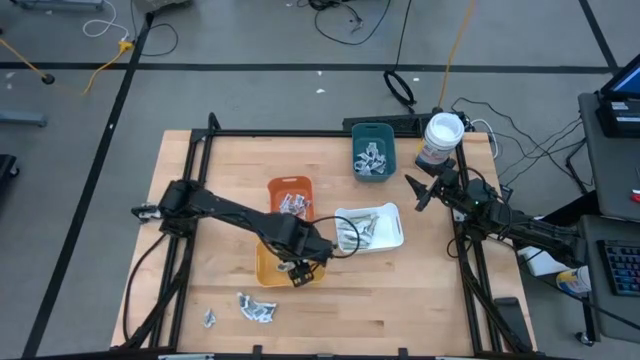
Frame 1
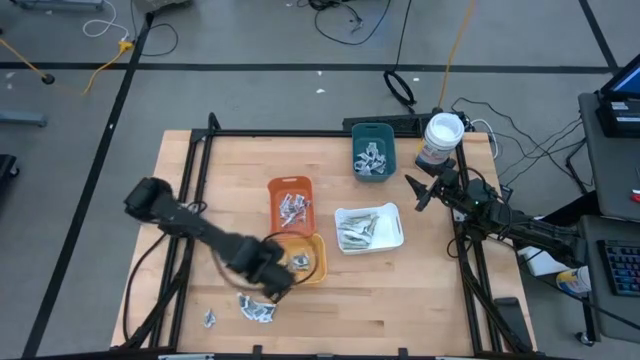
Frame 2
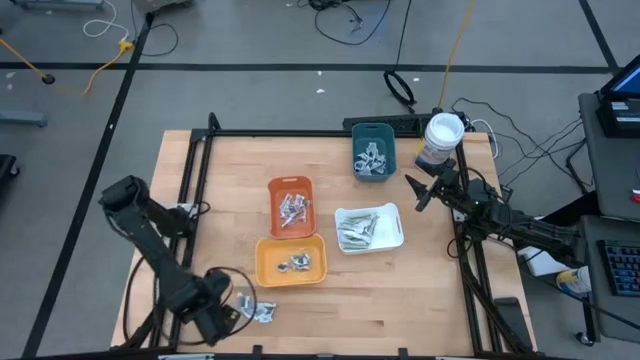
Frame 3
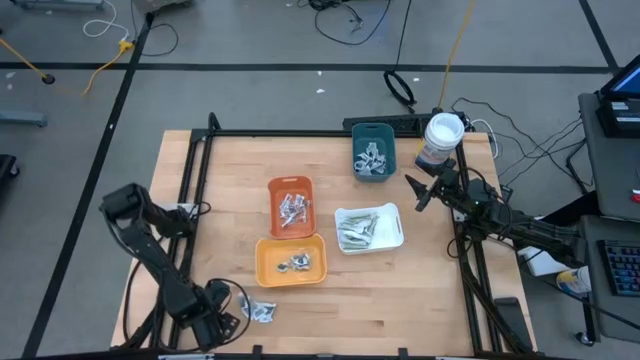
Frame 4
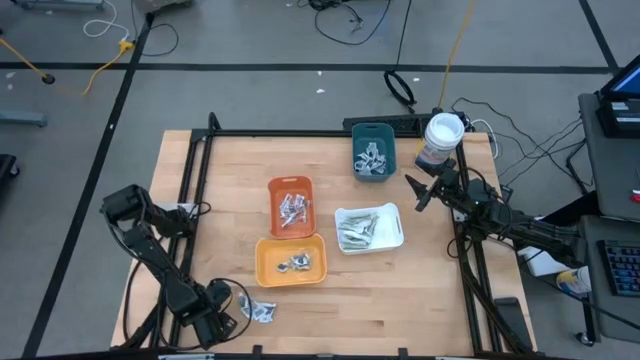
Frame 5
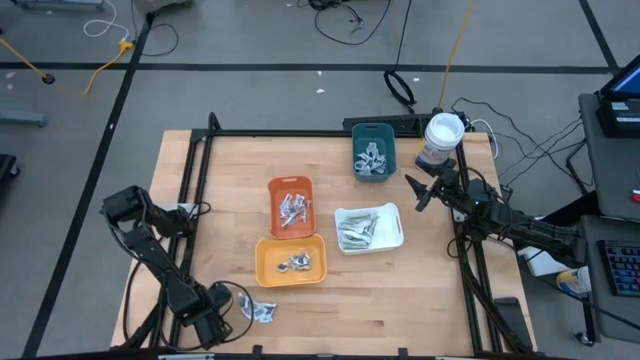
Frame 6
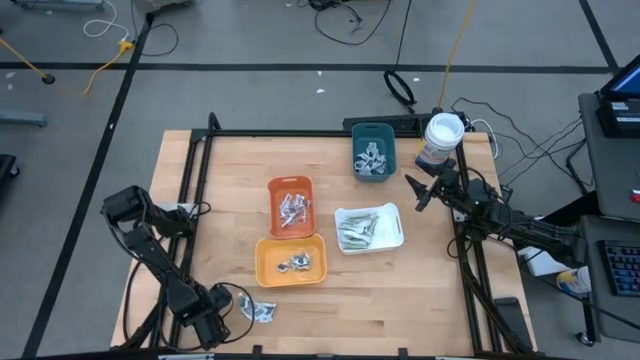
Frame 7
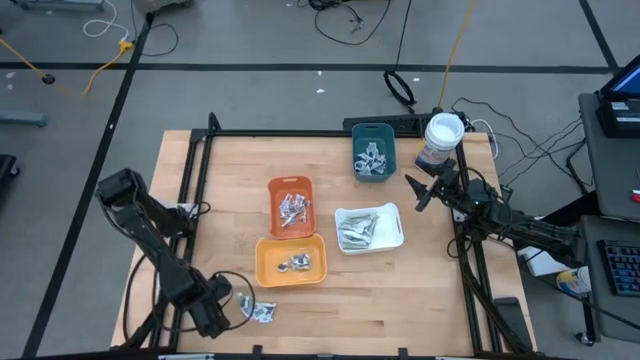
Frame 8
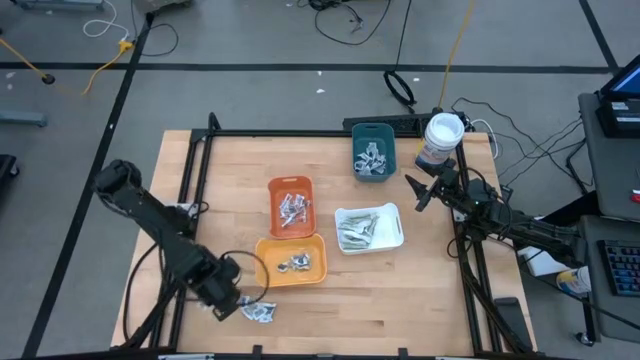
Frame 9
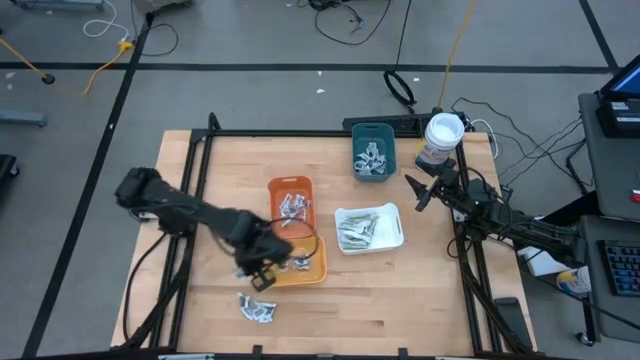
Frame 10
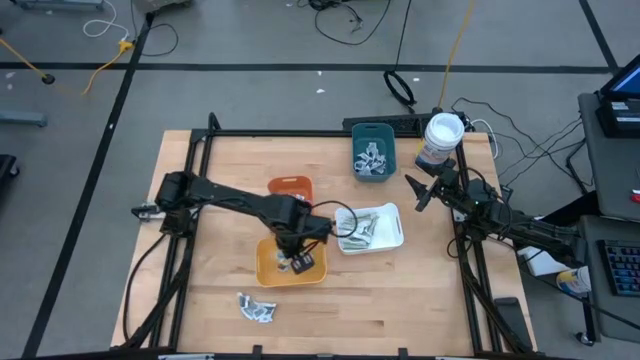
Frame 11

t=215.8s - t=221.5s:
Task: Pick & Place First Aid Supplies
Put the gray sachet into the yellow bin

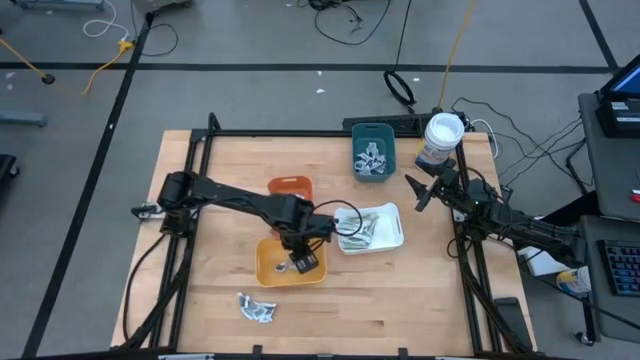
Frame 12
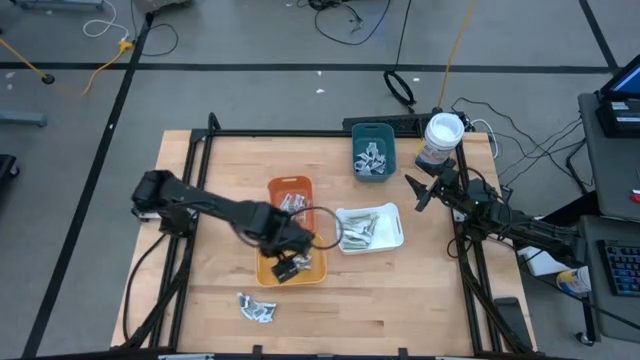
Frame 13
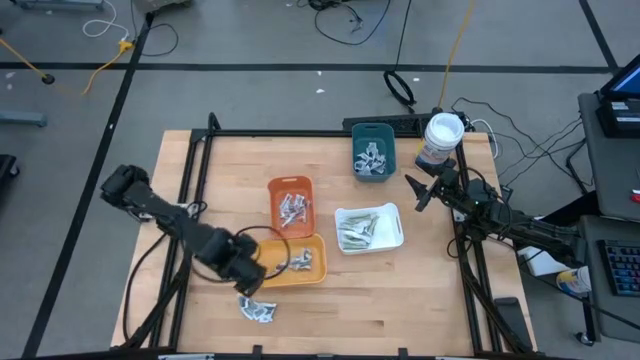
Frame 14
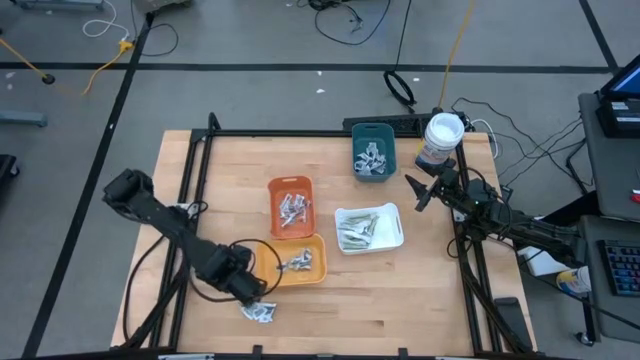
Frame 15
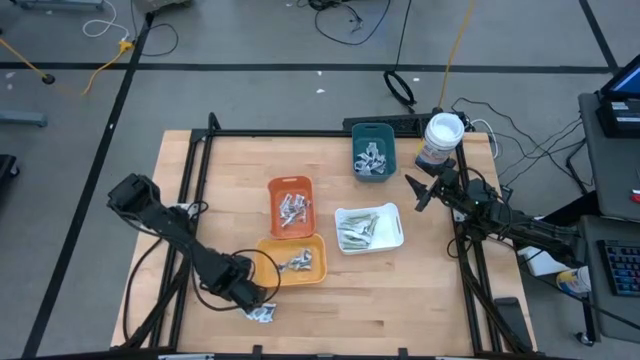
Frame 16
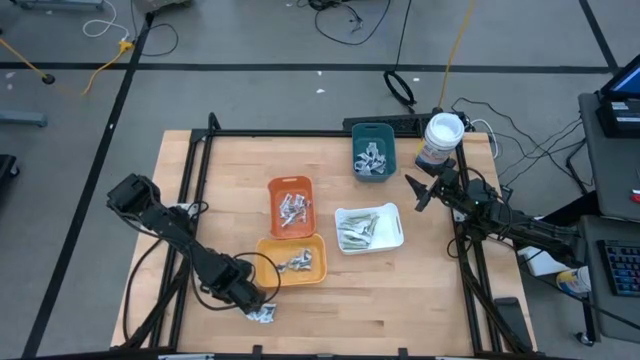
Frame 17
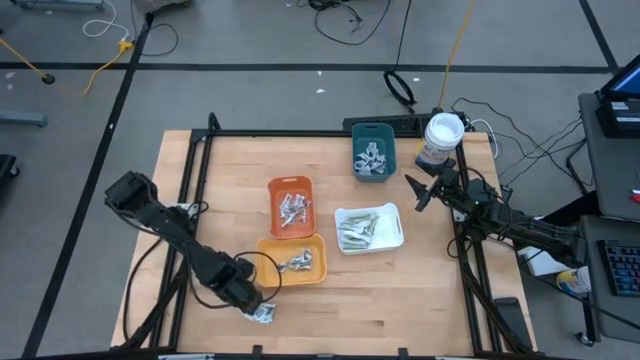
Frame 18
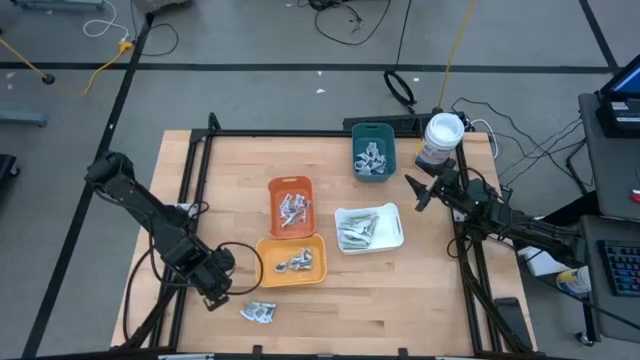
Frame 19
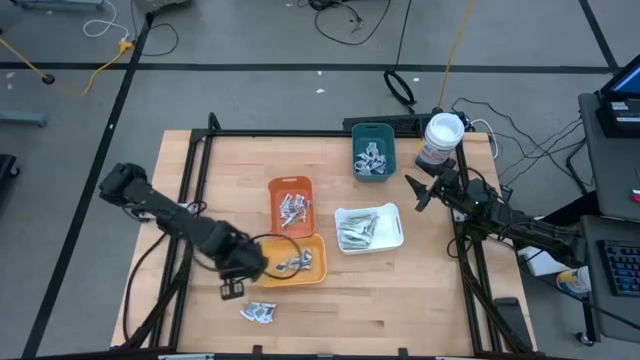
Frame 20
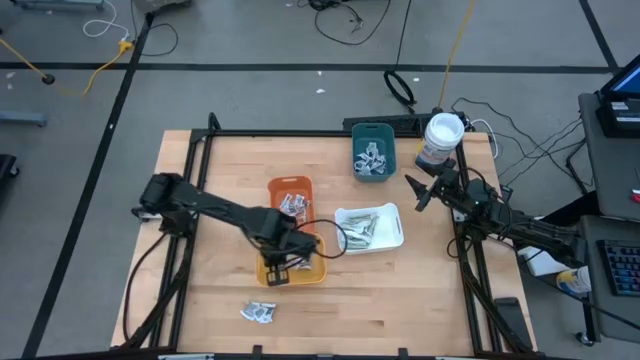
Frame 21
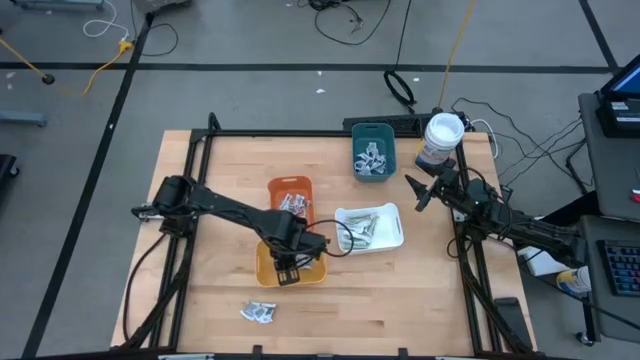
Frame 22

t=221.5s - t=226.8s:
Put the gray sachet into the yellow bin

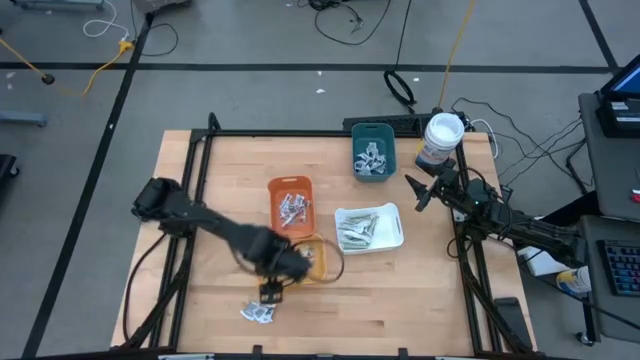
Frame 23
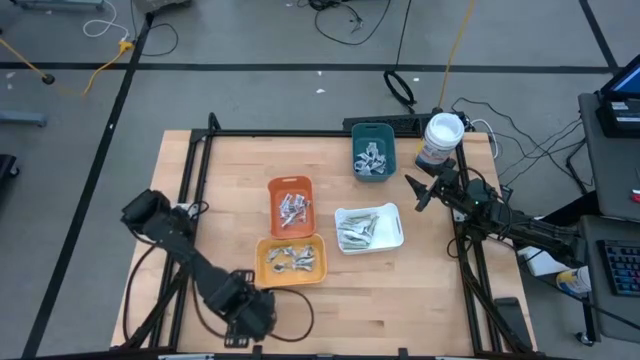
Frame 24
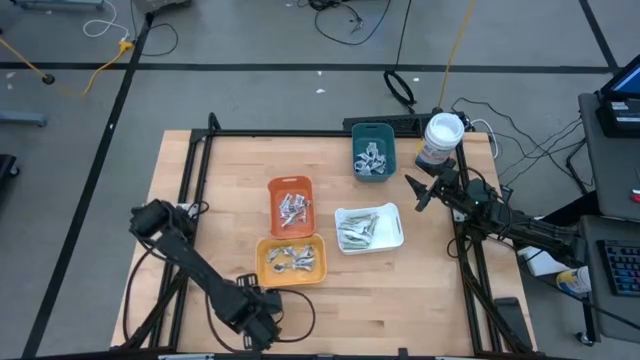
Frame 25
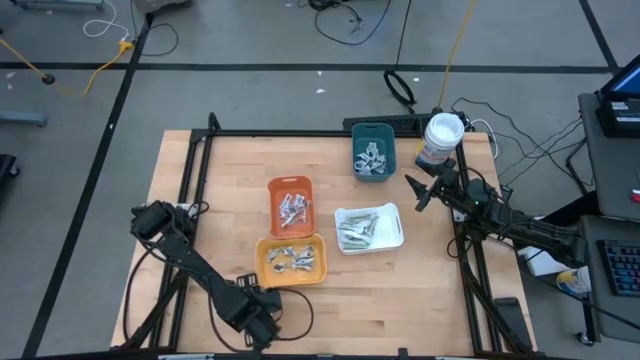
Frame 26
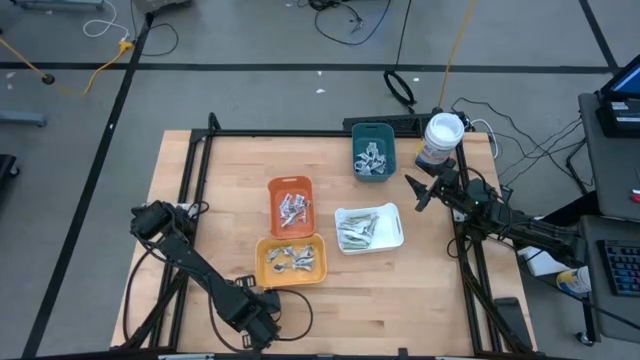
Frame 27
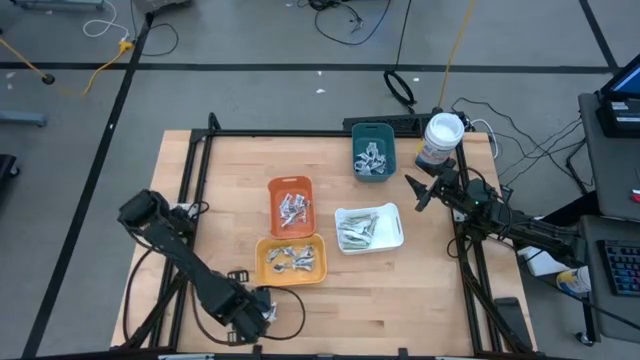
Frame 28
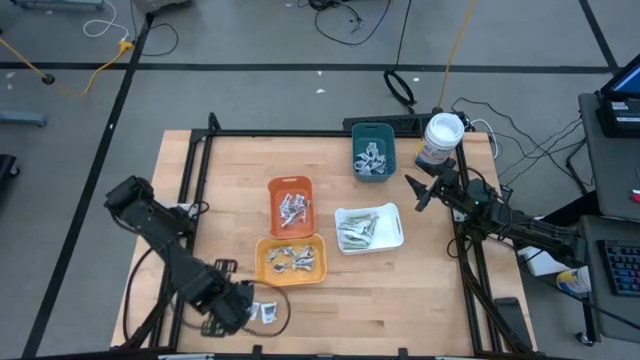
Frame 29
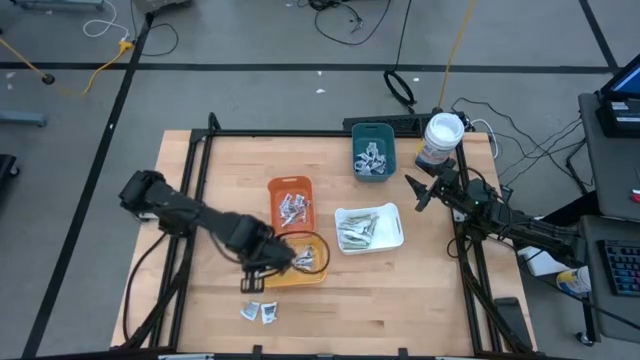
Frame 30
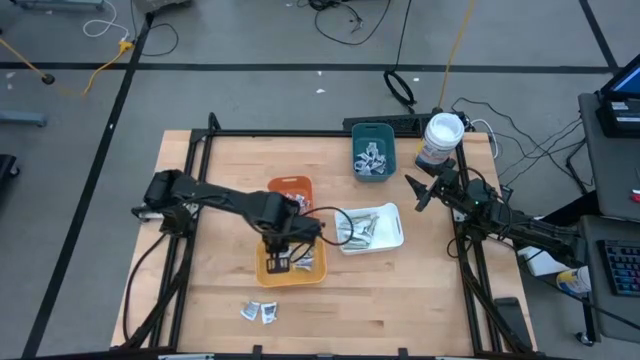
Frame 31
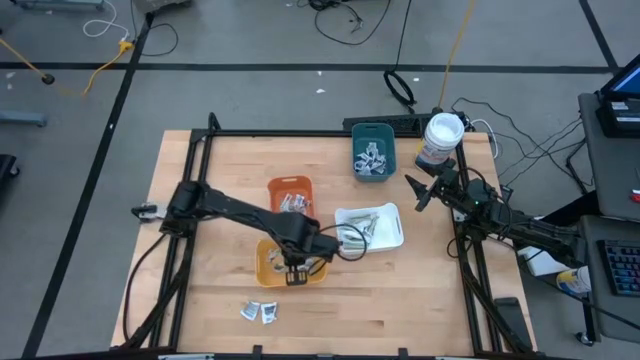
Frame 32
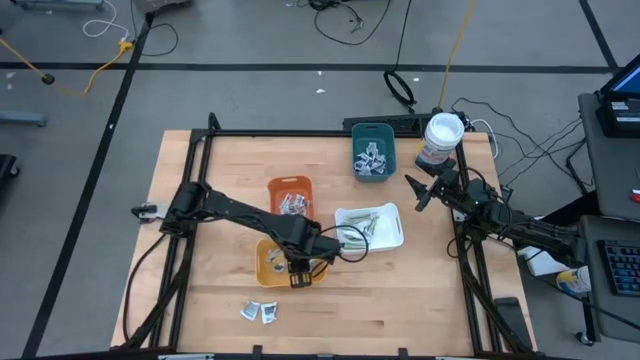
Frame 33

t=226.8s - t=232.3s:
Put the gray sachet into the yellow bin

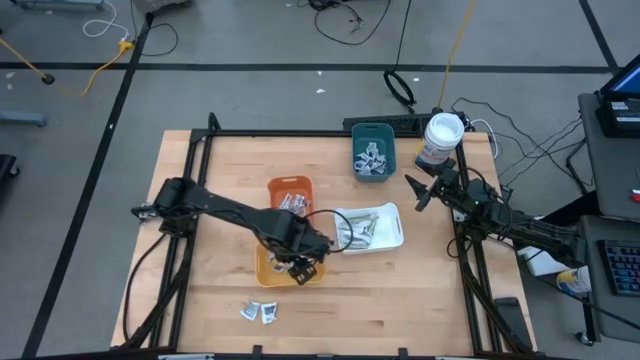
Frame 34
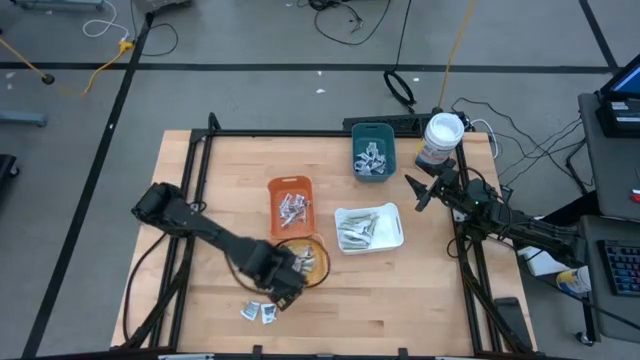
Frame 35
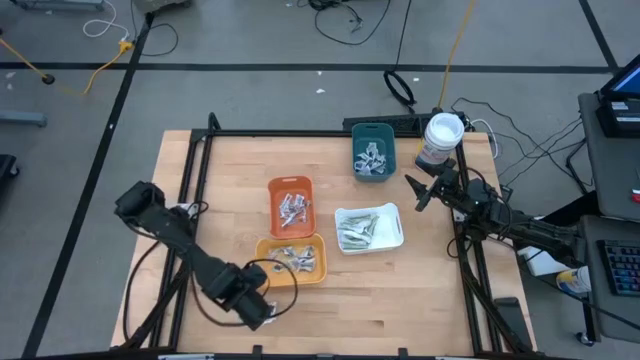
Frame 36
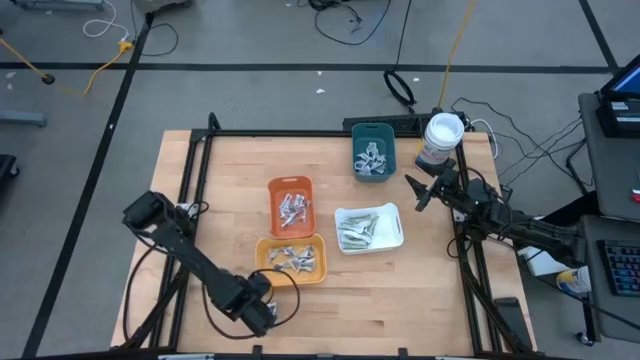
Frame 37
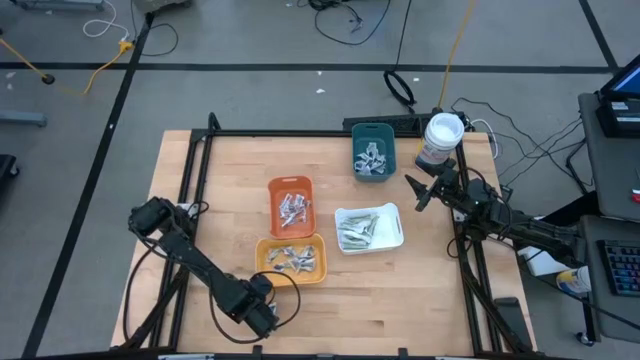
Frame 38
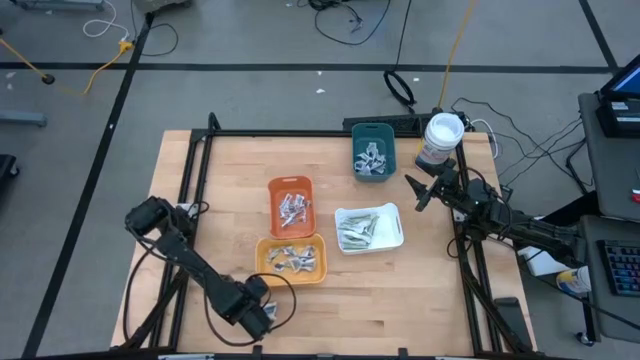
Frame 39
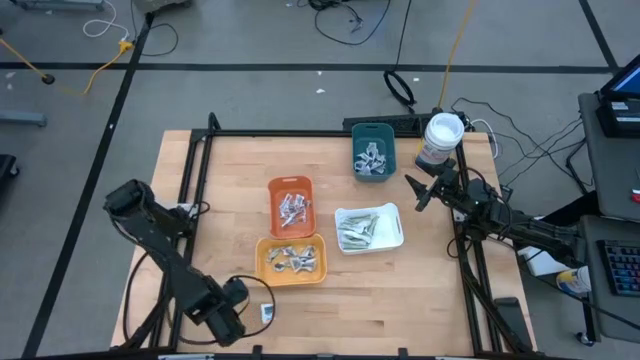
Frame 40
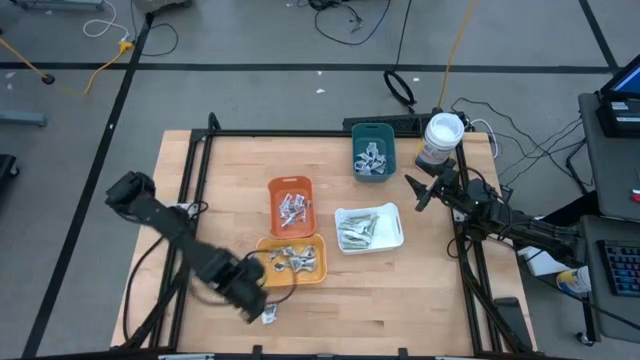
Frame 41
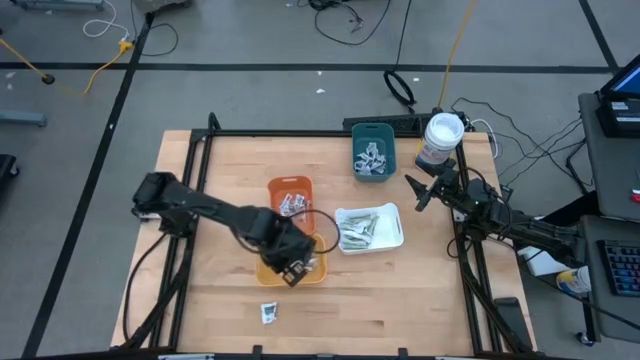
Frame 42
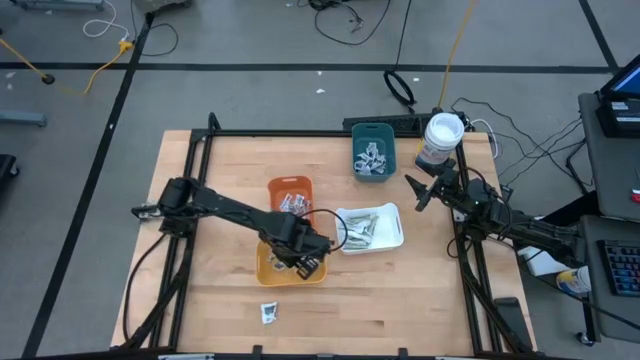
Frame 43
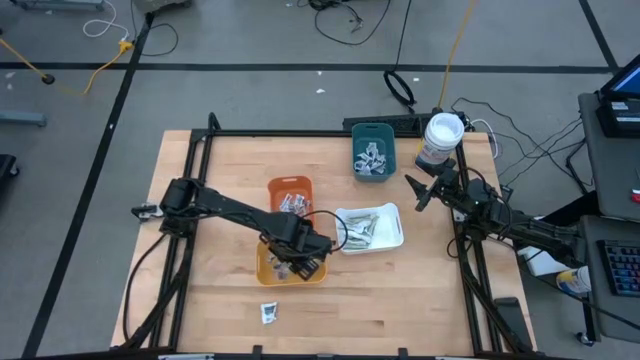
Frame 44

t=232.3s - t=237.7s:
Put the gray sachet into the yellow bin
